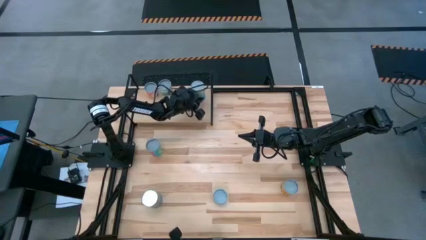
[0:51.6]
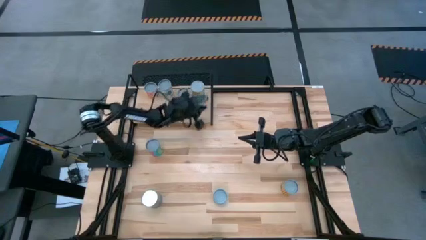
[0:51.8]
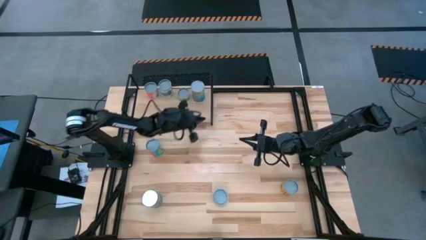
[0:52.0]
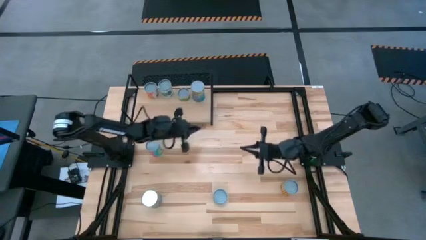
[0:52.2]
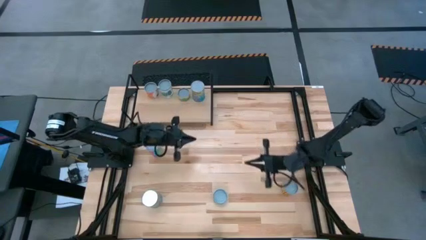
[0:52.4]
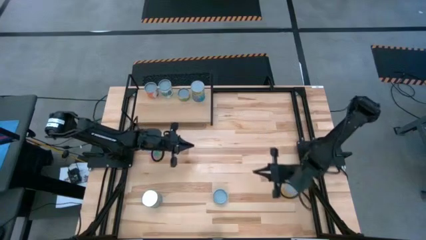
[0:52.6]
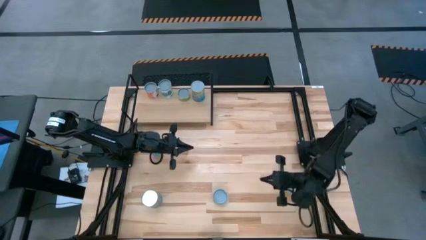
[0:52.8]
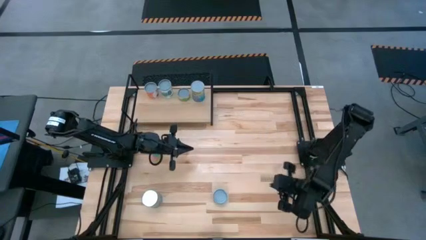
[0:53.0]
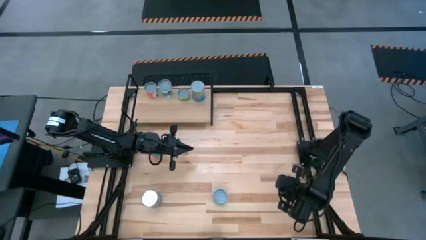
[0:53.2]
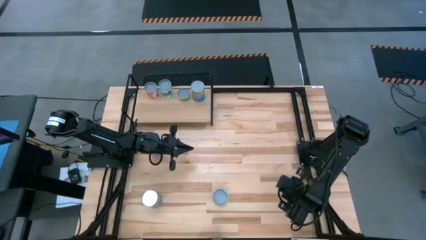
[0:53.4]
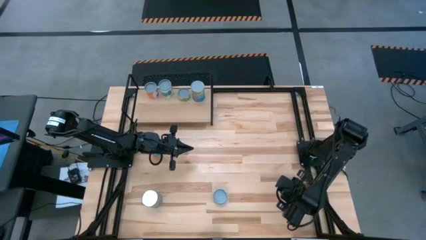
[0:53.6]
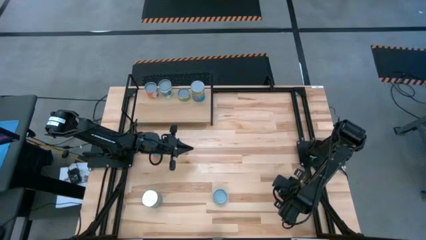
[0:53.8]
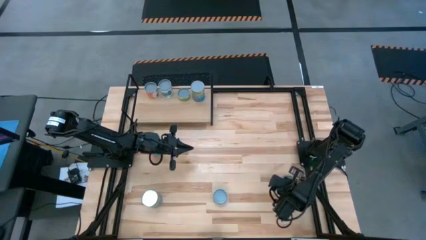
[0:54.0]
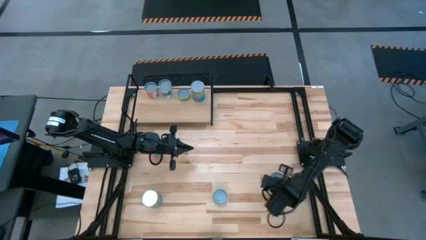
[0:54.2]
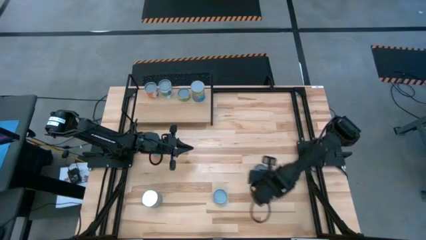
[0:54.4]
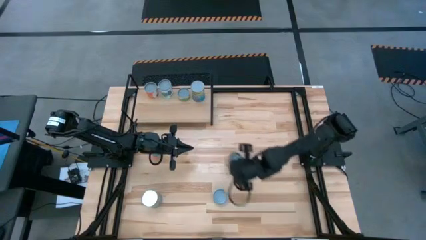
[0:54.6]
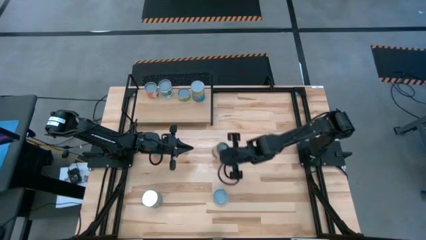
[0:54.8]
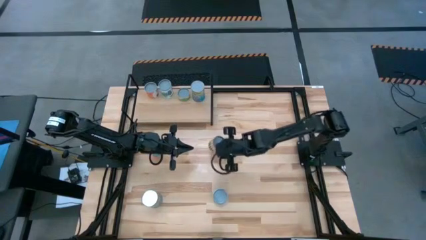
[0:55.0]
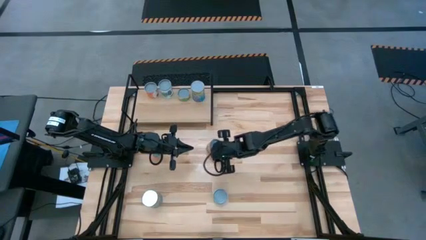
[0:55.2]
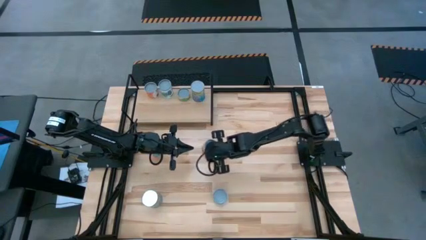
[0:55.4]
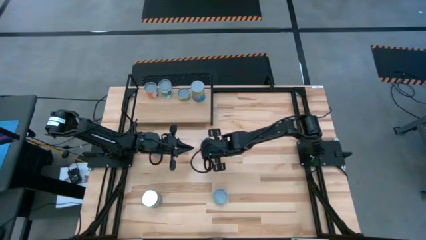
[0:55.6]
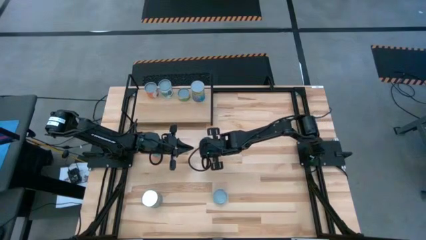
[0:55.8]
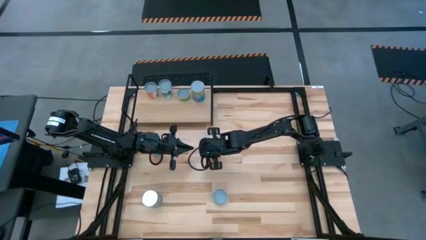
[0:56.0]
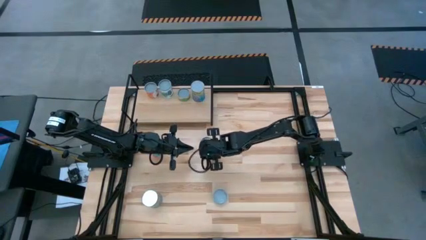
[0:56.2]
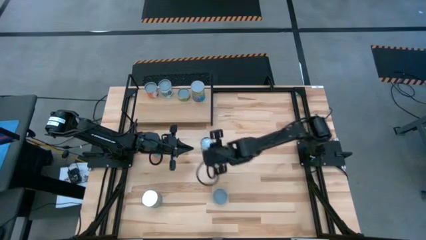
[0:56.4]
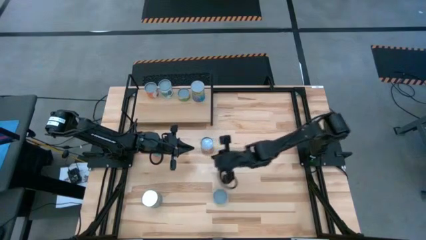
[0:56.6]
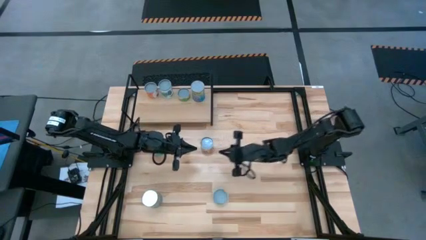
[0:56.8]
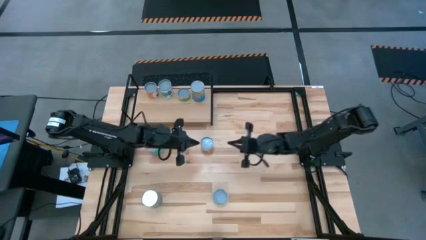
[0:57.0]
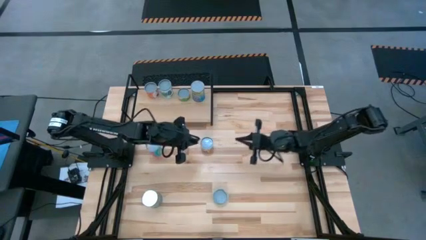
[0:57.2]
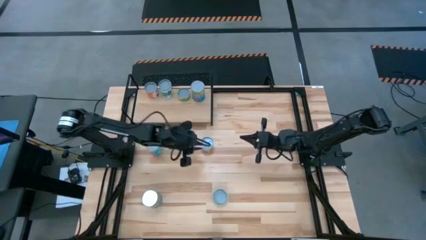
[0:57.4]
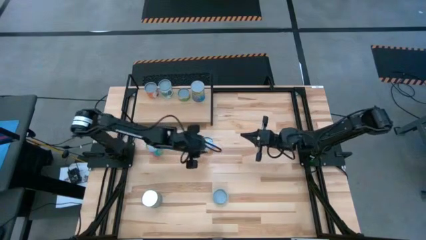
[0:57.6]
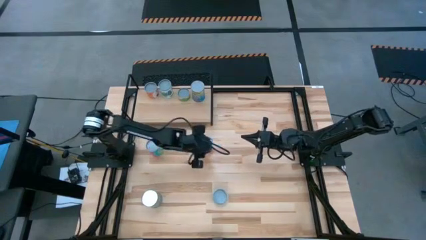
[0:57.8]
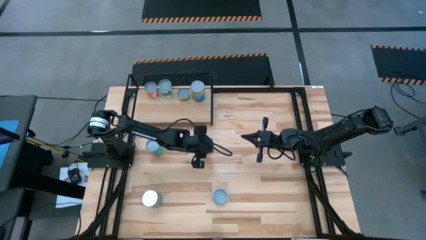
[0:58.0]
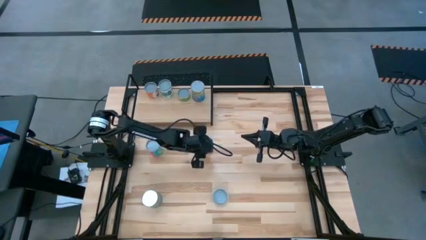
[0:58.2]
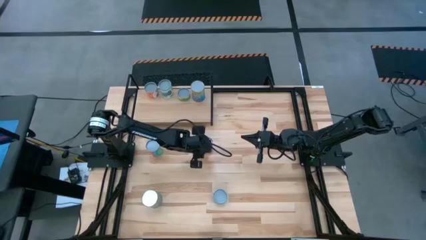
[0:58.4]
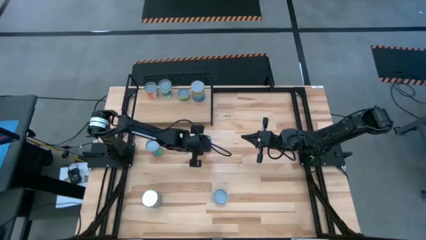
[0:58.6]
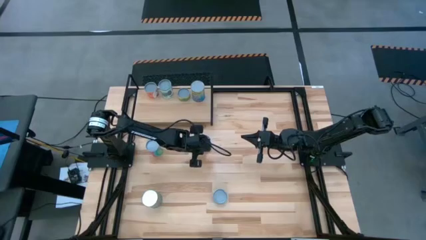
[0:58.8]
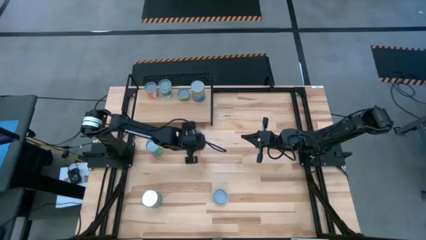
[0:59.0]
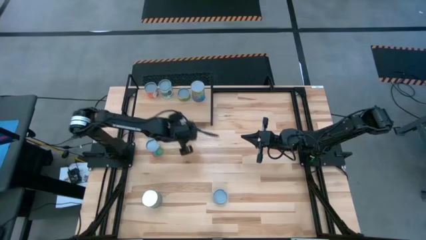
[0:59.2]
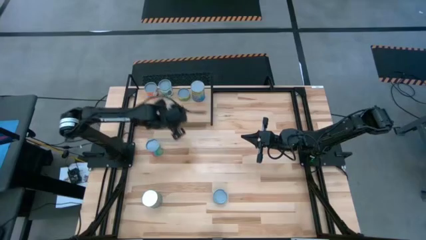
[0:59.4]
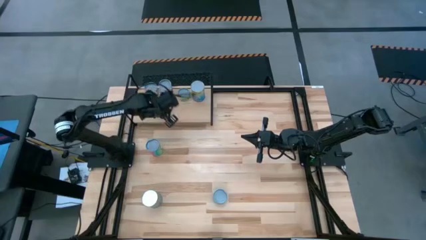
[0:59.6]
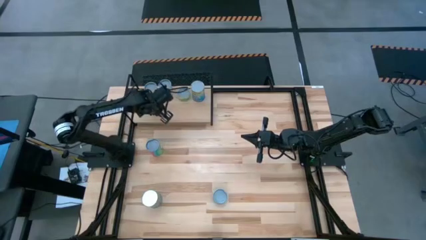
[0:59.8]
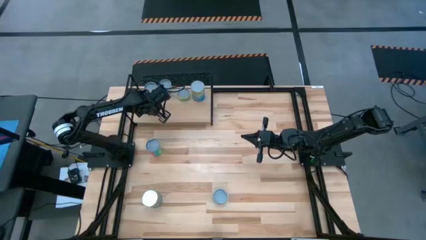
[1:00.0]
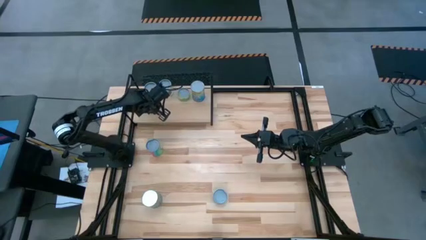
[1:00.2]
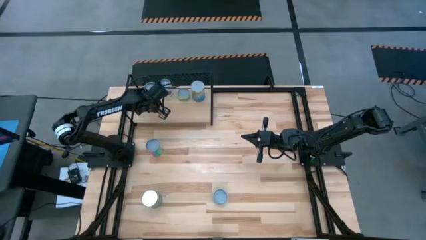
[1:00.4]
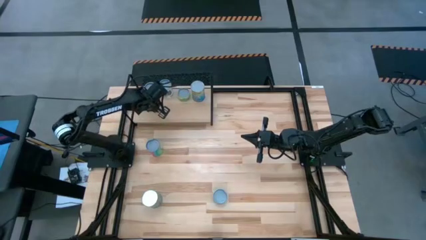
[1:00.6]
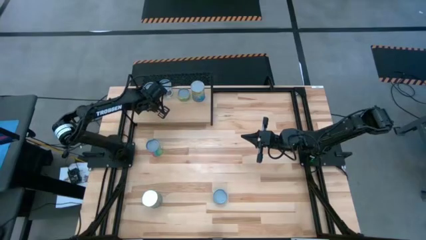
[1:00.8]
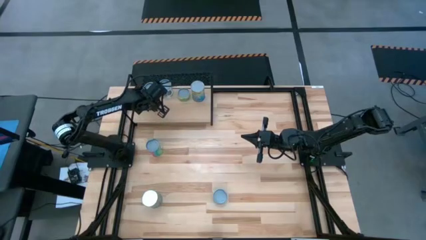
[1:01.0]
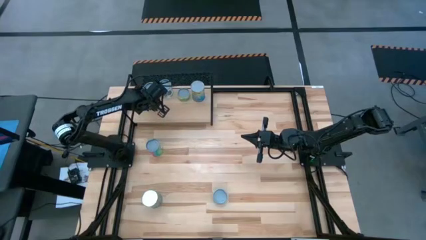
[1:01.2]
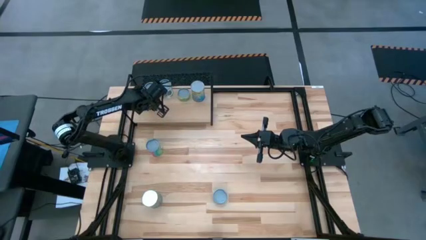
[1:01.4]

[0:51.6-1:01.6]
Task: Pick and place cans onto a shelf
Put the canned spicy black beans on the shelf

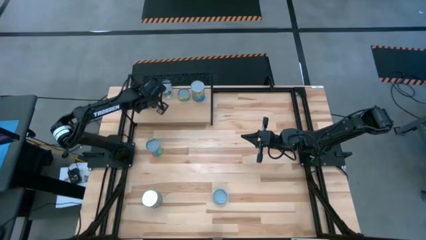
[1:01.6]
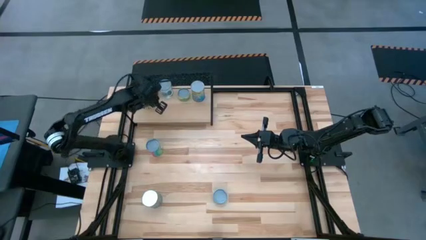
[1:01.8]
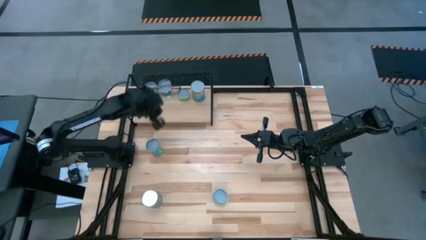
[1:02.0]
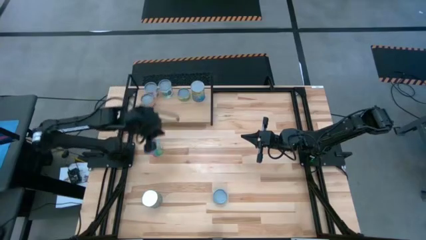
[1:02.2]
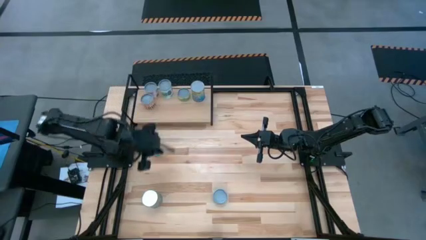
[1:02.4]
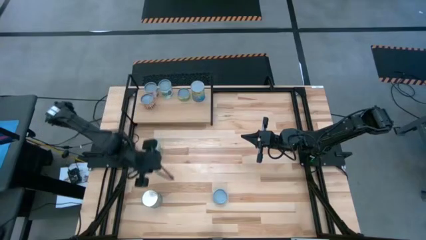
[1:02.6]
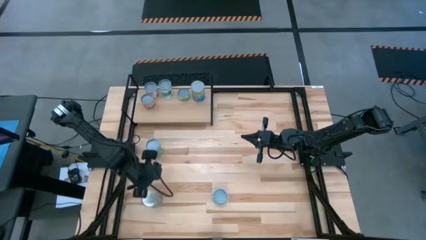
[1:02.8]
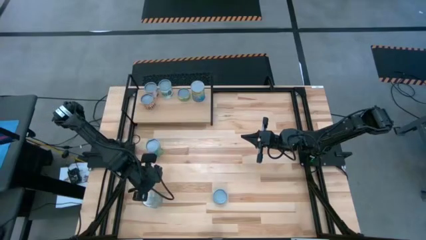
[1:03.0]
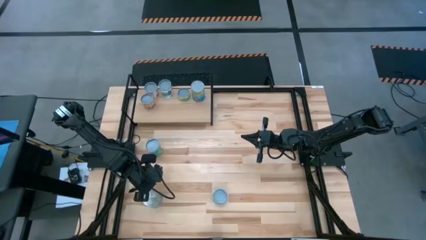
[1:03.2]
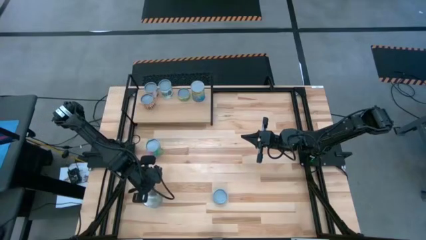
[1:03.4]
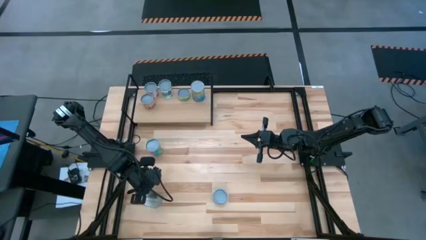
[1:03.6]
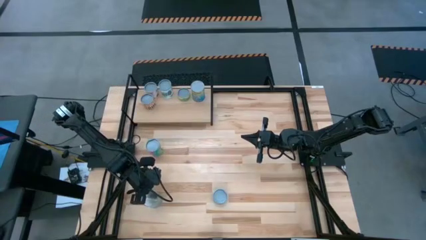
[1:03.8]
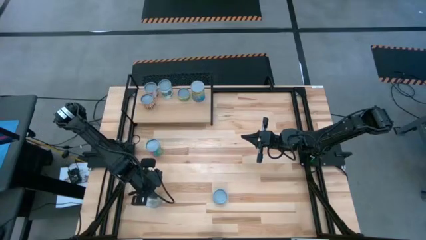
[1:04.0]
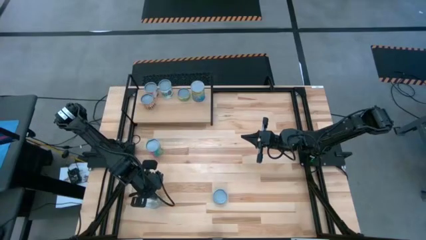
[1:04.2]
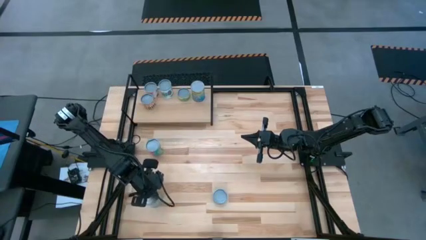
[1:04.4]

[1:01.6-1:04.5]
Put the canned cherries on the shelf

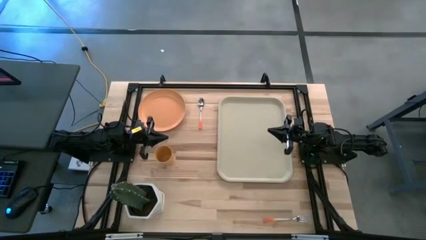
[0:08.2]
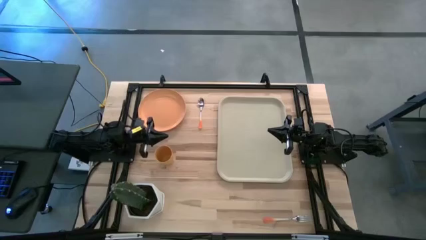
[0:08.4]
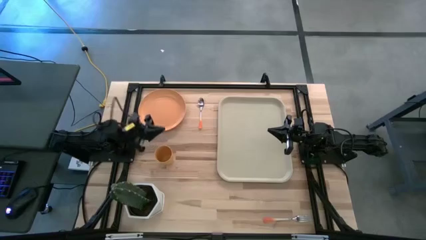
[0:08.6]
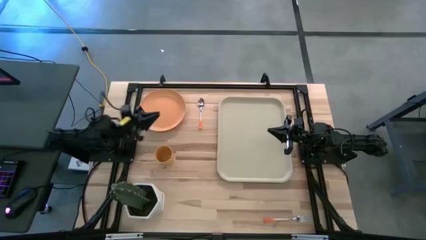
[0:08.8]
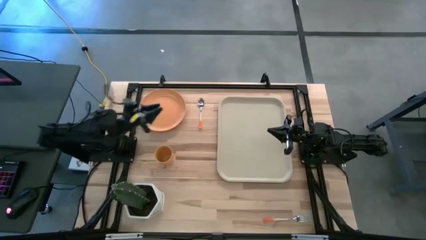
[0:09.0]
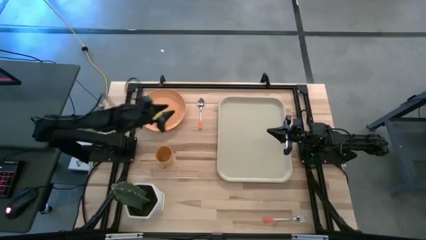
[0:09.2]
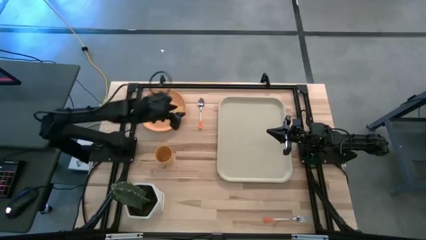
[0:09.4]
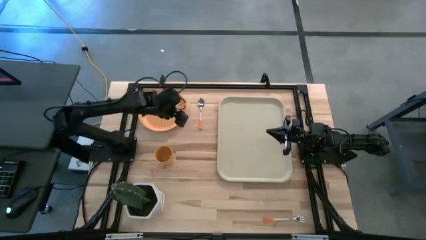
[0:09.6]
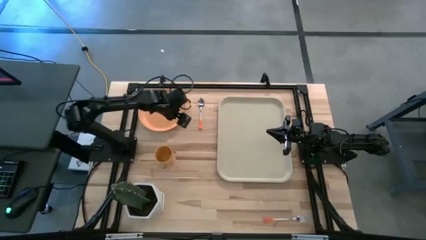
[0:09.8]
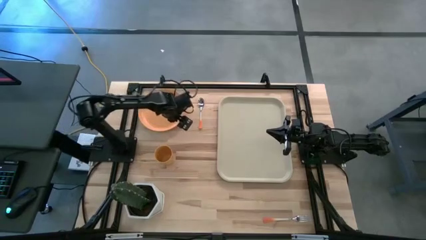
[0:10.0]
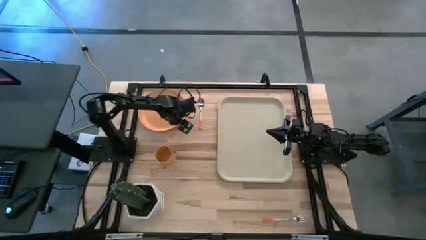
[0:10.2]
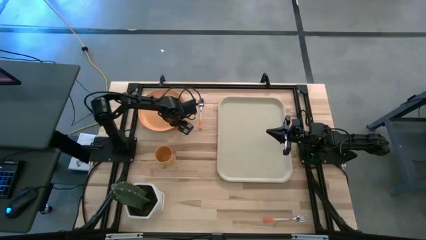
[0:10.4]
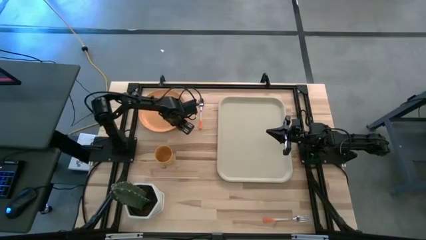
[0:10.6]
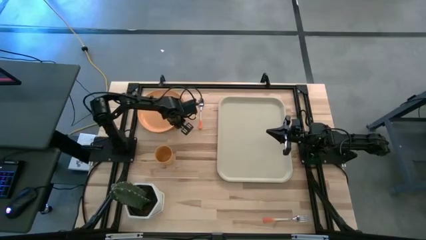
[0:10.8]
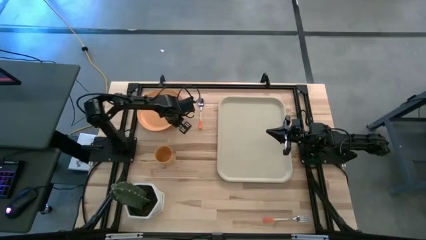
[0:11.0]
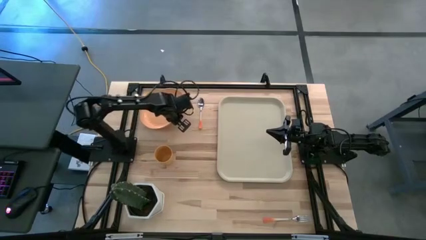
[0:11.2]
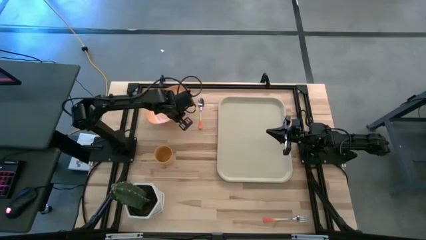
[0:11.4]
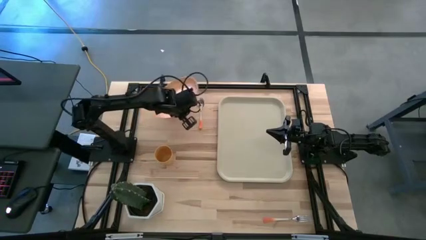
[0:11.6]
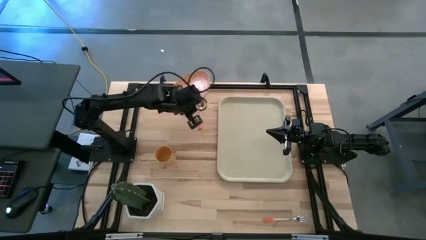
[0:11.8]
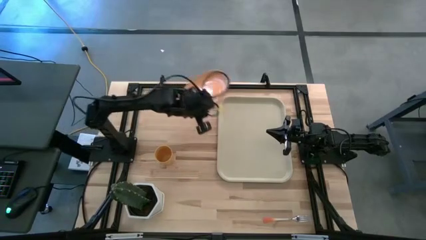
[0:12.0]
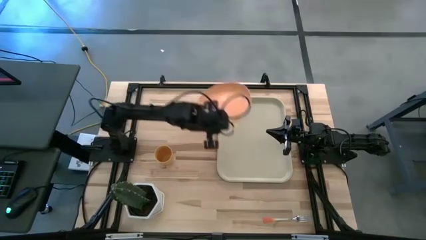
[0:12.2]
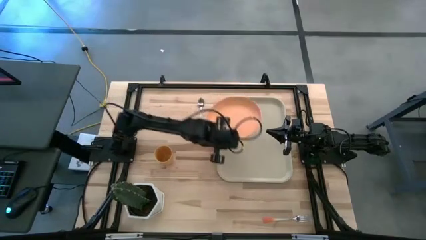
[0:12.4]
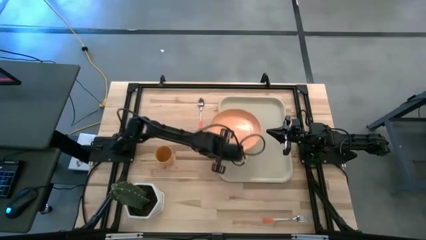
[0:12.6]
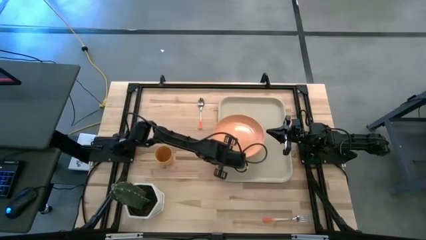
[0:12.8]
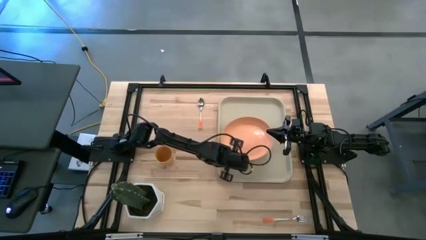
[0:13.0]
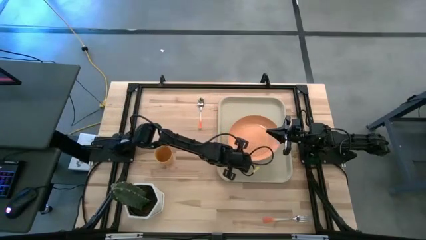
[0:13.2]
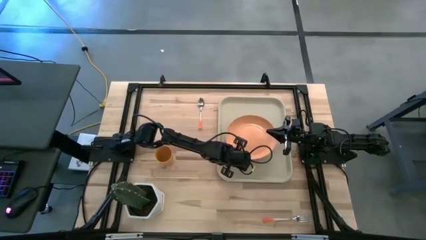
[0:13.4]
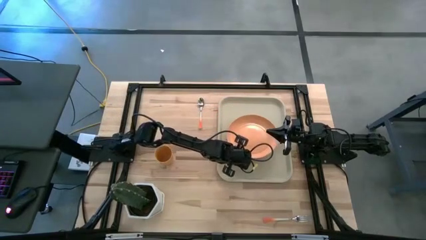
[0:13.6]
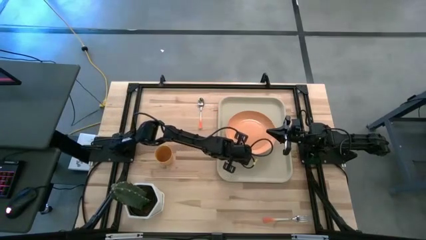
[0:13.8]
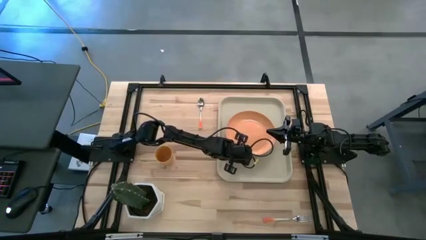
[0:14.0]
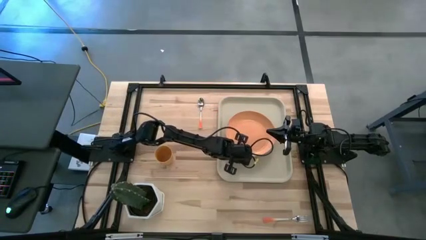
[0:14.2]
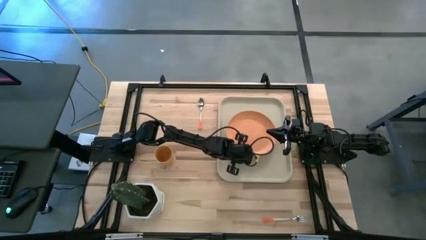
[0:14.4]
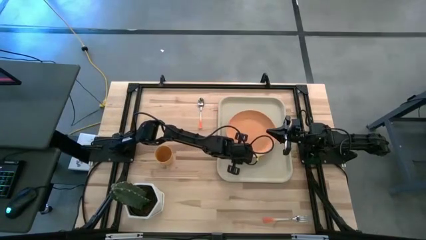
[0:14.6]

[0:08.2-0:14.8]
Task: Pick and place plate/cup/fork/spoon on tray
Put the orange plate on the beige serving tray
